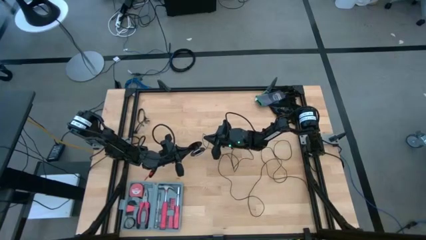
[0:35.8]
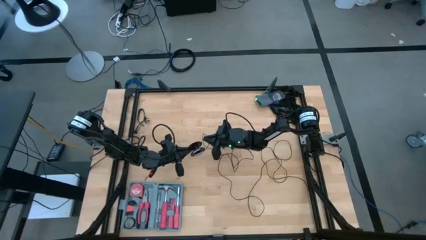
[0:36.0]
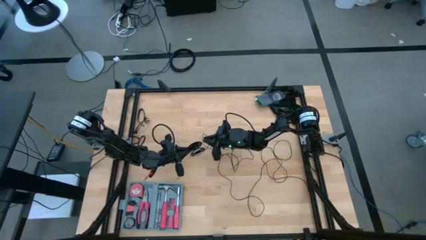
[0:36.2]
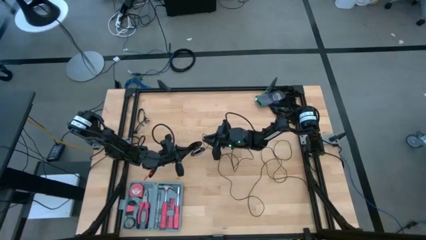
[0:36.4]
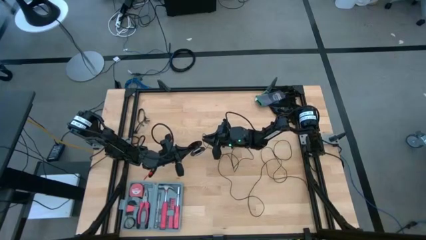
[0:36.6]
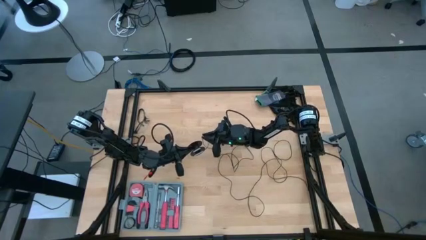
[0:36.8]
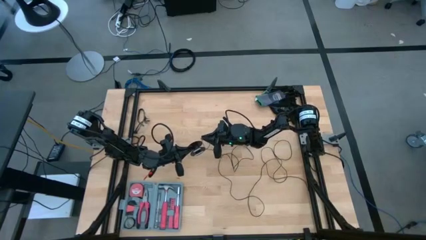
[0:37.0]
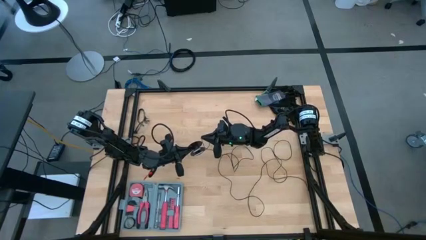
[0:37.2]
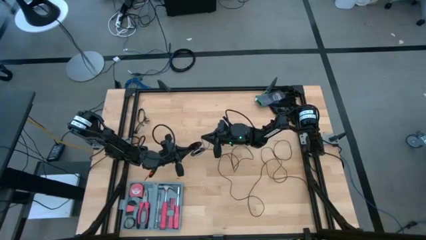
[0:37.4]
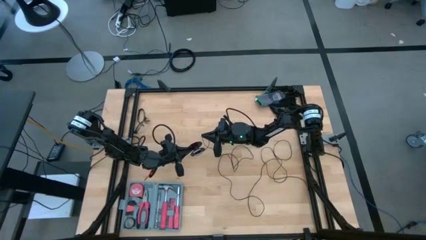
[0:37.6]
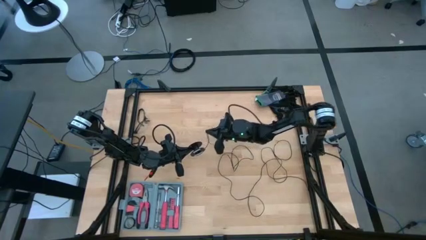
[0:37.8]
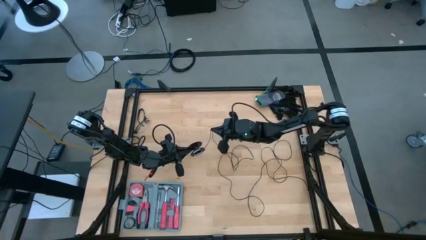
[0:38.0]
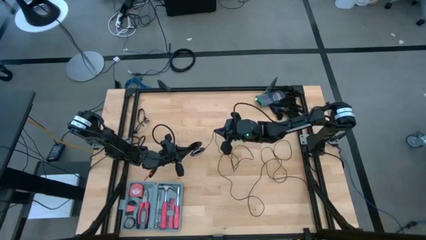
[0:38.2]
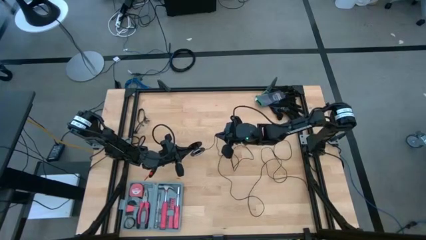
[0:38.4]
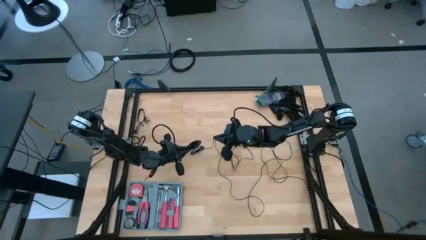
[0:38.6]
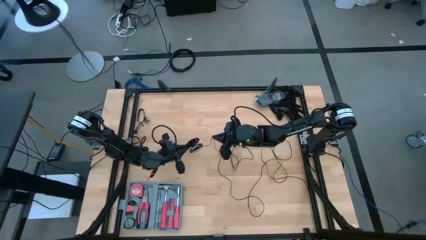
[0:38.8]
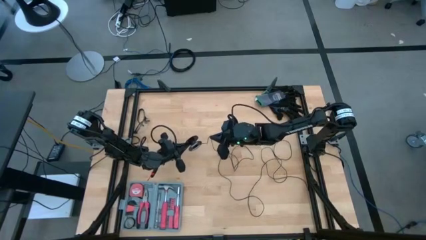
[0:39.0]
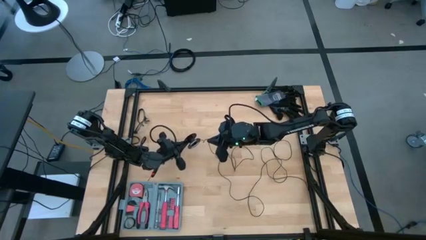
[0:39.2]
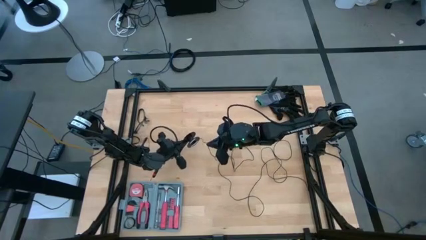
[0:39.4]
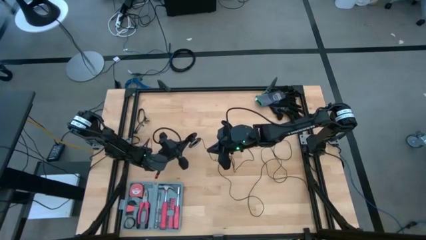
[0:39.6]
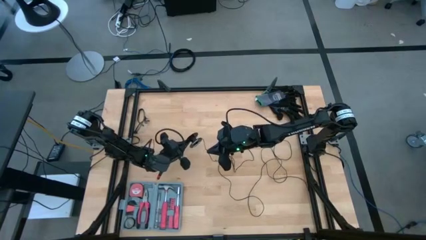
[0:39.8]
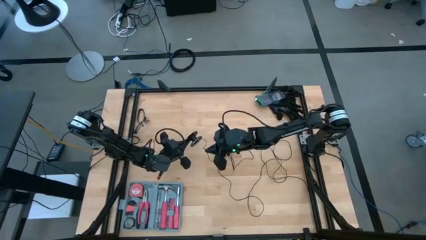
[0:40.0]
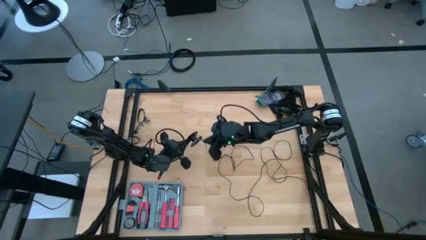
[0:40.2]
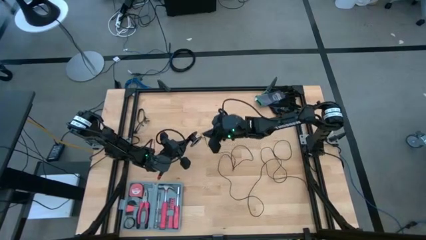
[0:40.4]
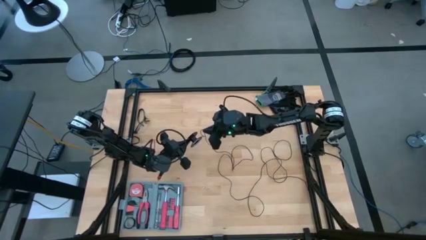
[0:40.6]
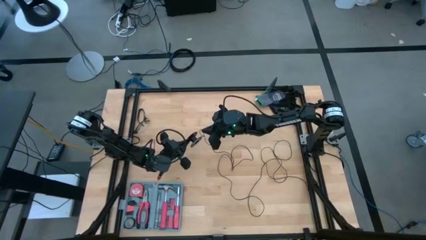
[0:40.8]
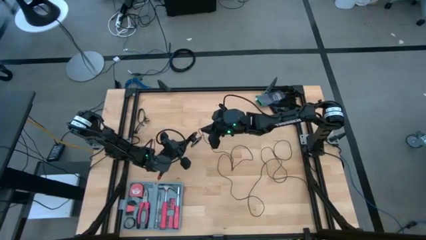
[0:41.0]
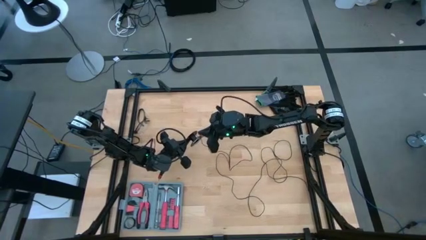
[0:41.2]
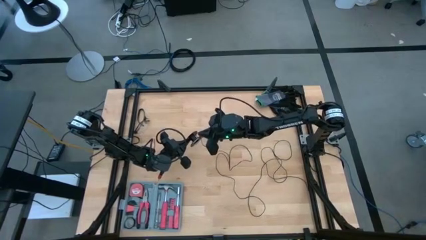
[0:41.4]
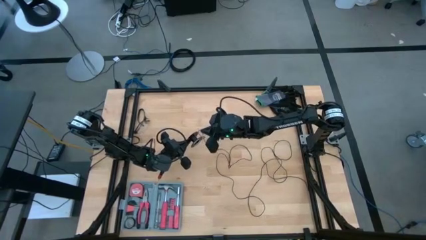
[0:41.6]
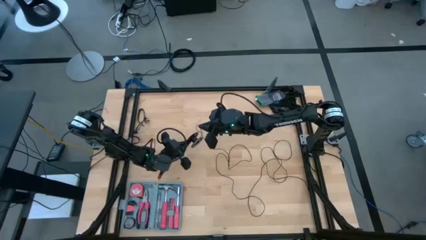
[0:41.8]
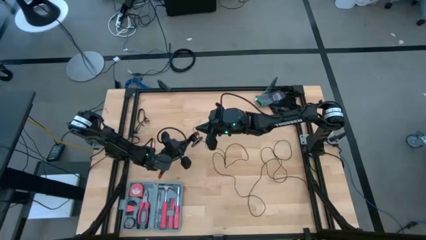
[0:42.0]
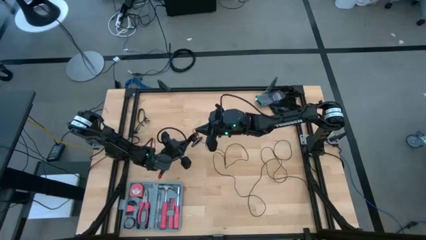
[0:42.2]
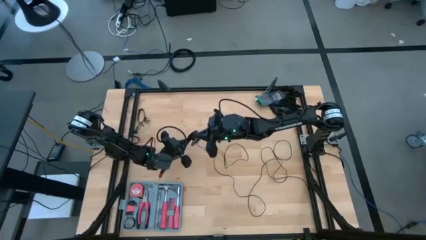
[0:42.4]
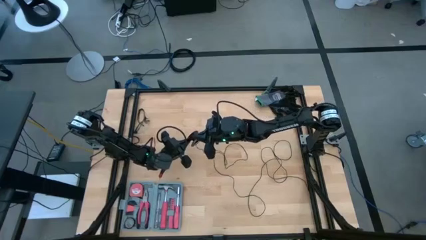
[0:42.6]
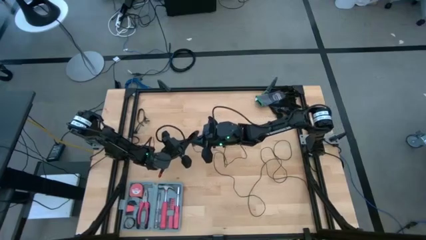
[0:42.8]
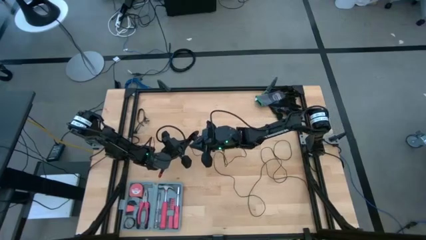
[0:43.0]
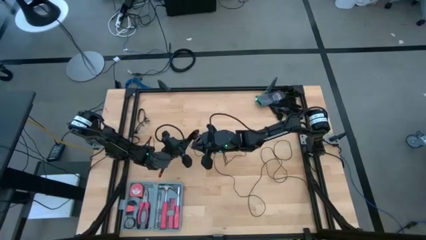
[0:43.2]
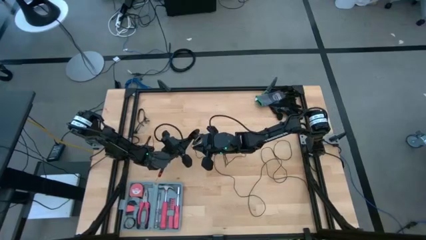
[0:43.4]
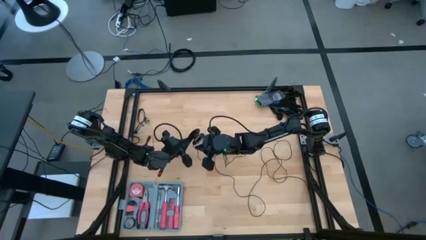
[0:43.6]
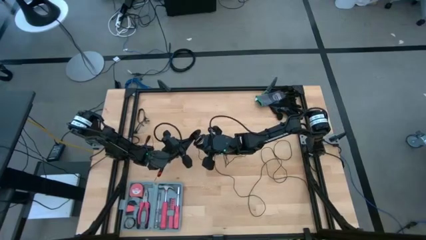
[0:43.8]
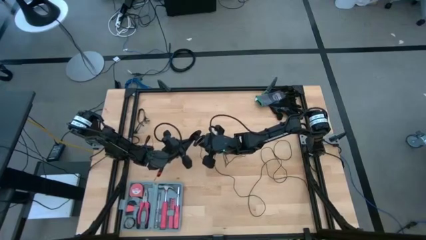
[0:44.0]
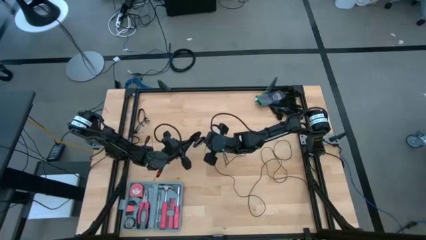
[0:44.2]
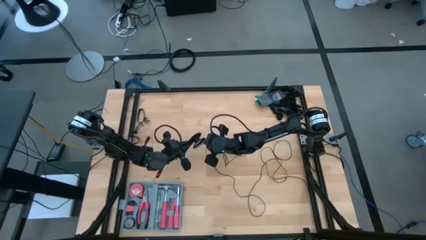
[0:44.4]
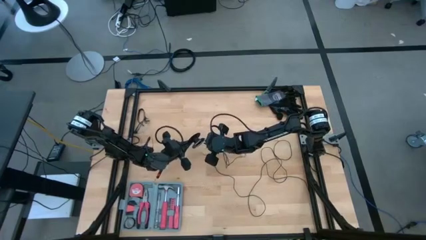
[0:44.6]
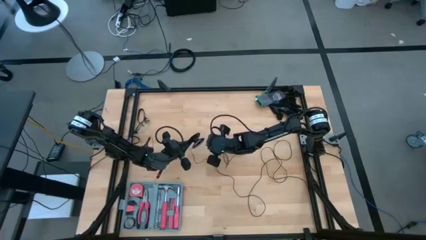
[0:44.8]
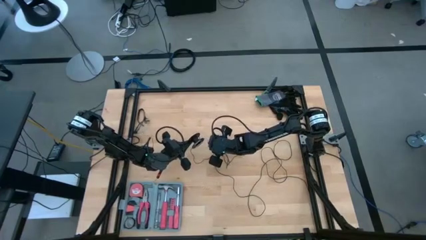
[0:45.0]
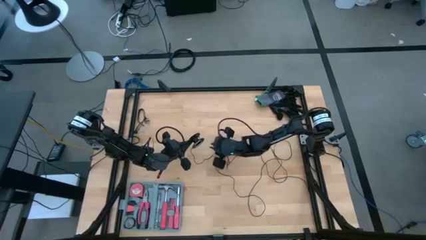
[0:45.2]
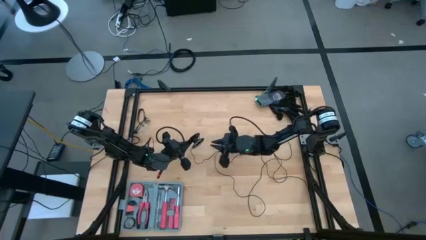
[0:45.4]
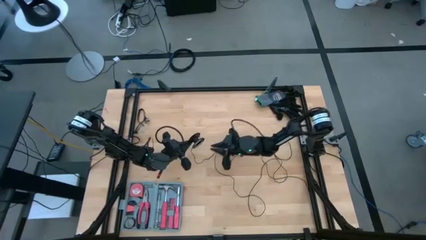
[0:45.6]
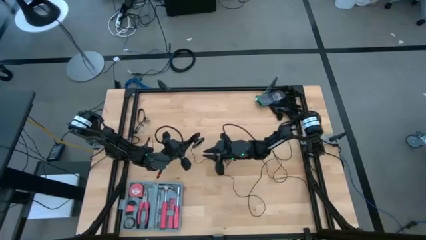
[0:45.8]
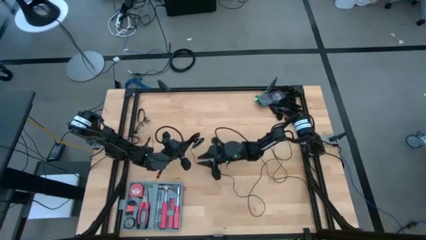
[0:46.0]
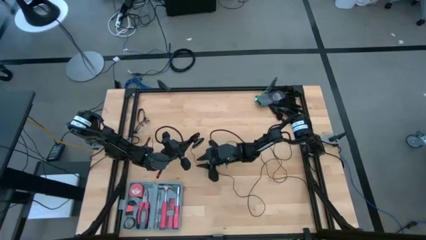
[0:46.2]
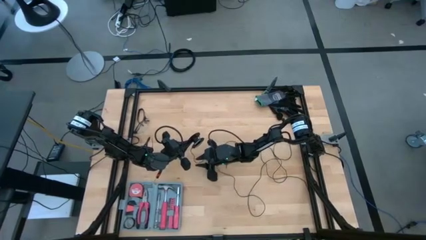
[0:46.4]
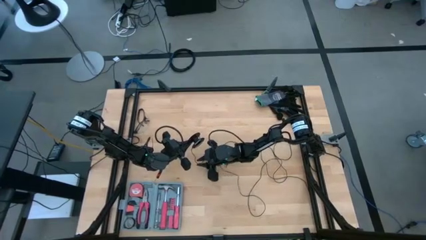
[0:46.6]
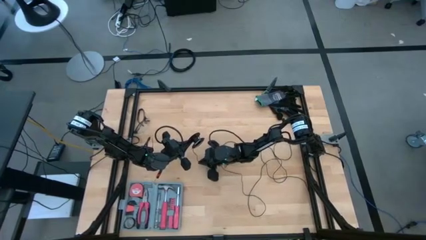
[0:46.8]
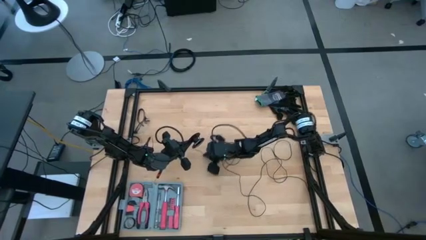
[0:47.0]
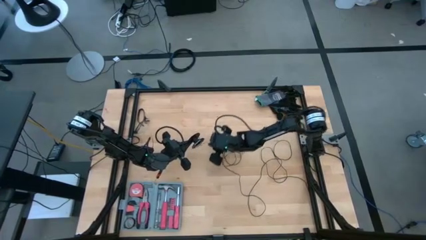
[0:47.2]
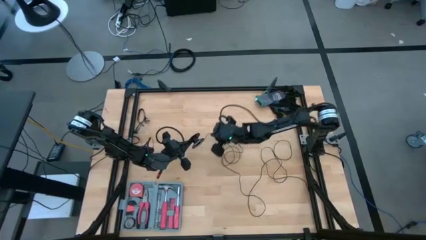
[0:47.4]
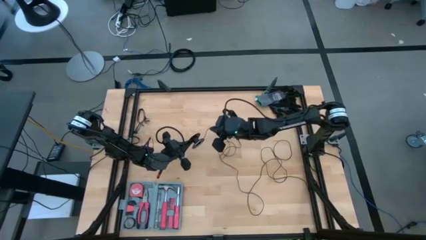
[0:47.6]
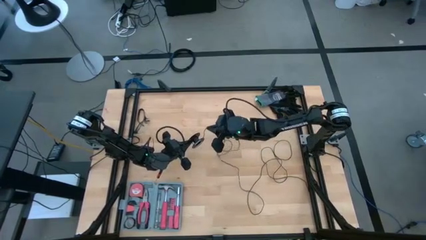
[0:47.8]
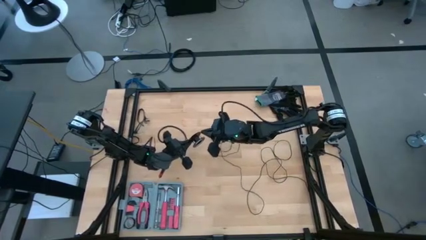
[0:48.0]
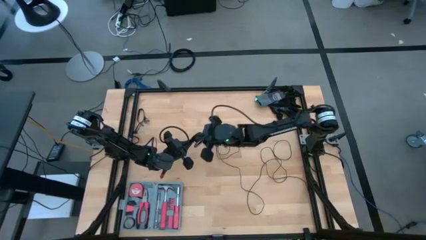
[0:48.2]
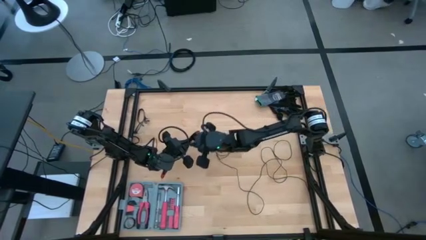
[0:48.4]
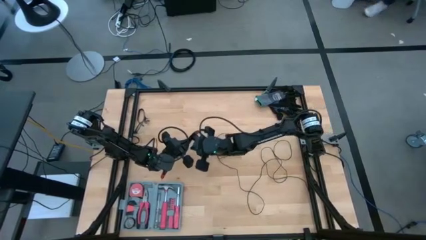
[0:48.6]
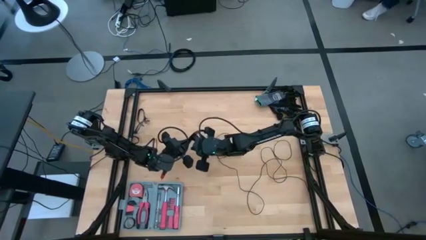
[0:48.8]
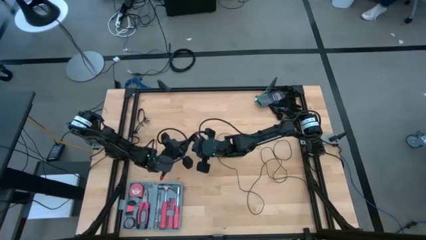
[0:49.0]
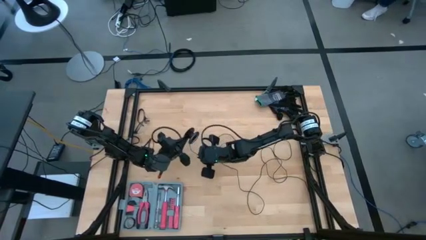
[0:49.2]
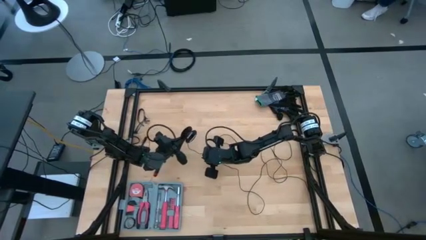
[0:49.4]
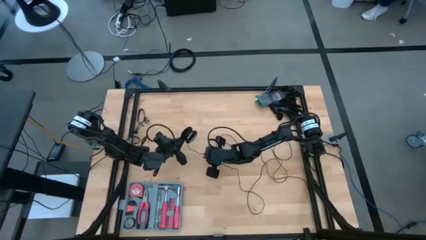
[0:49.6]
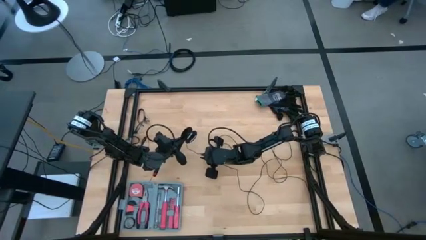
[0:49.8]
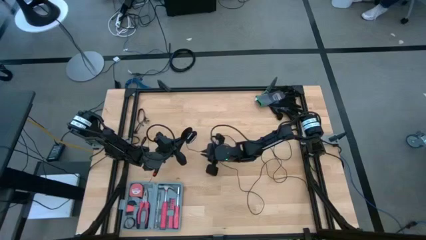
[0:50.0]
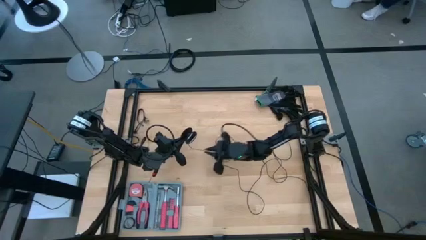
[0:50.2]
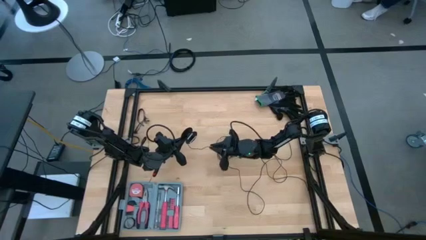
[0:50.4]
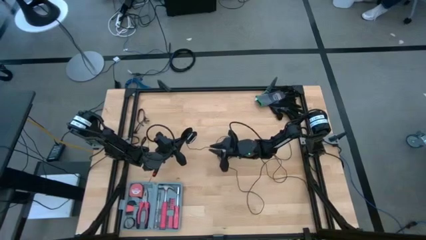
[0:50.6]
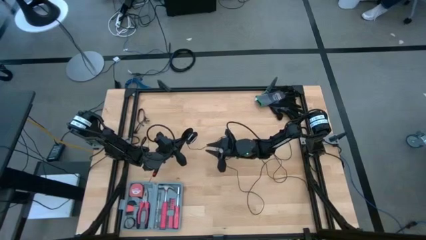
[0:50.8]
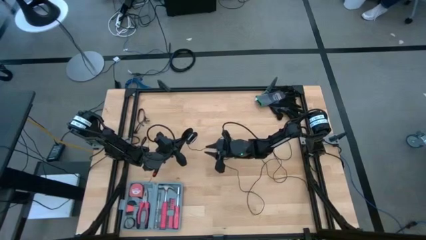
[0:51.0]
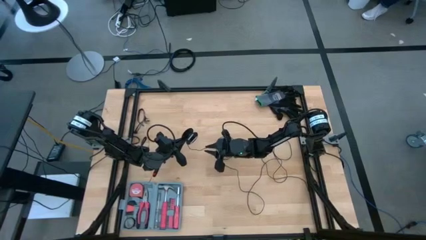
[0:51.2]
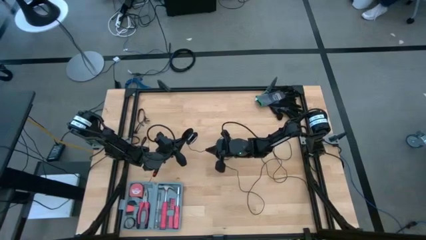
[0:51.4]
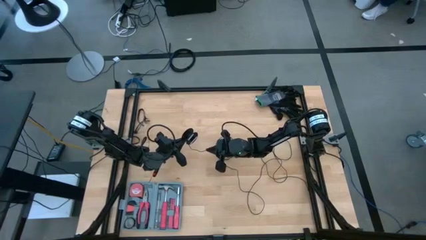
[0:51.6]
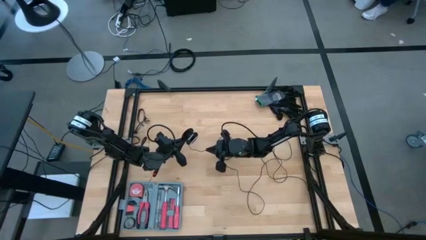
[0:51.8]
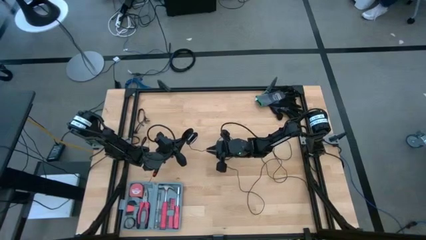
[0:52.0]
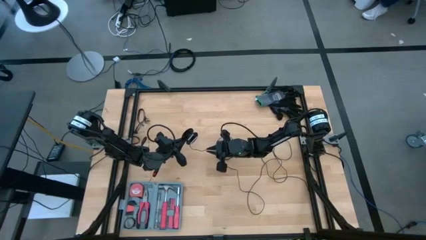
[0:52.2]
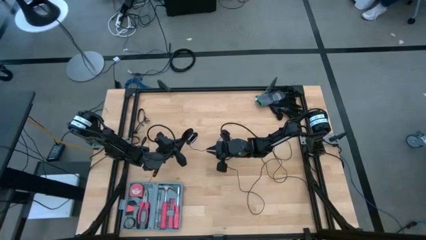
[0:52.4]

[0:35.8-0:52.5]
Task: Coil cords
Coil the black wire onto the spool
